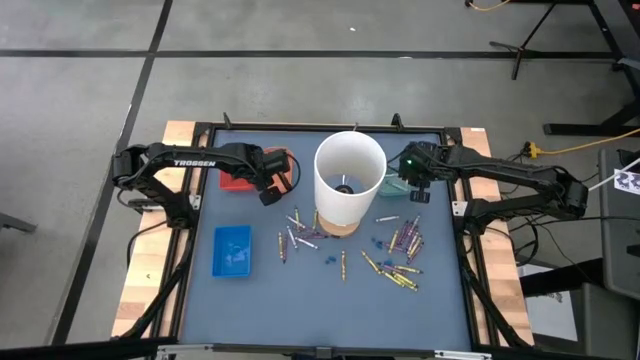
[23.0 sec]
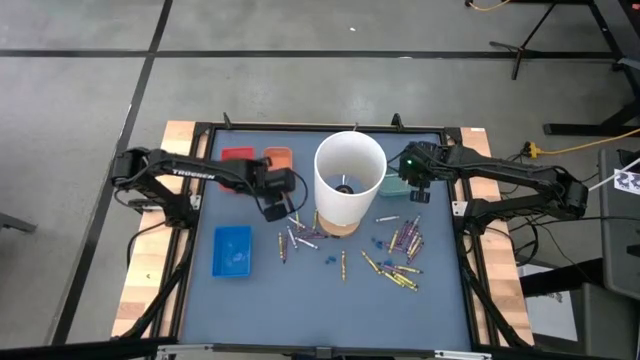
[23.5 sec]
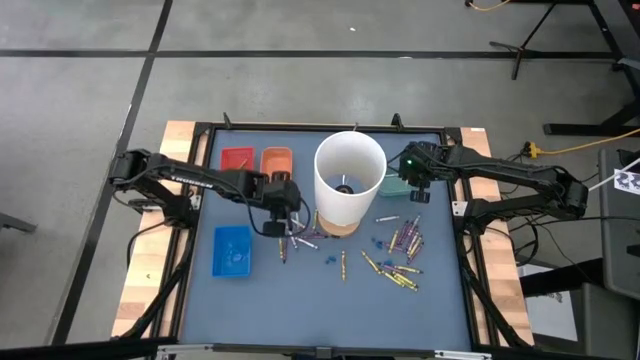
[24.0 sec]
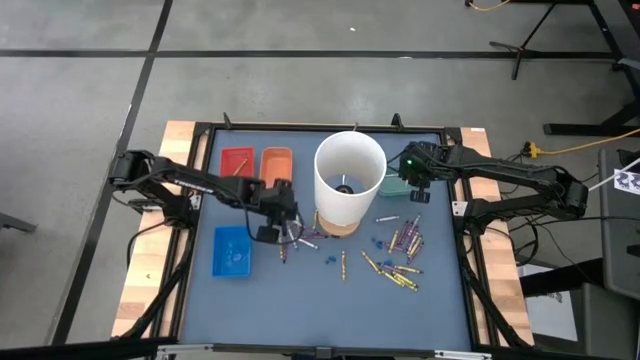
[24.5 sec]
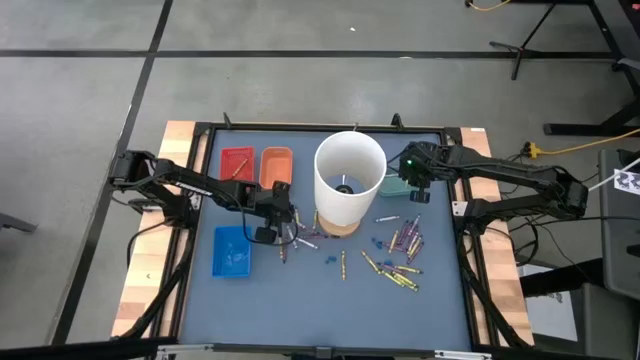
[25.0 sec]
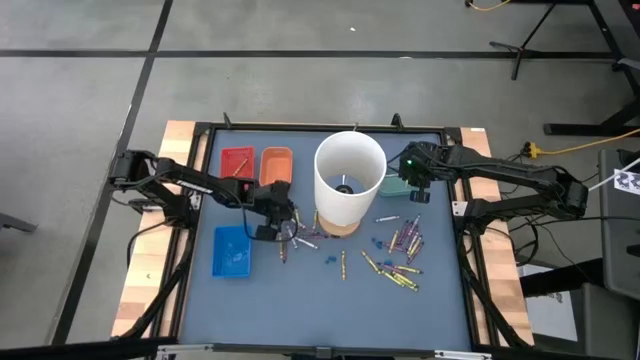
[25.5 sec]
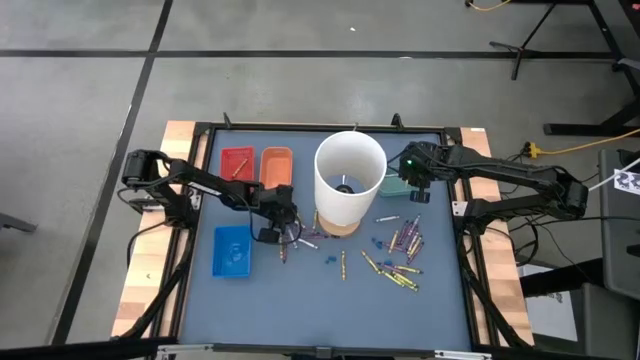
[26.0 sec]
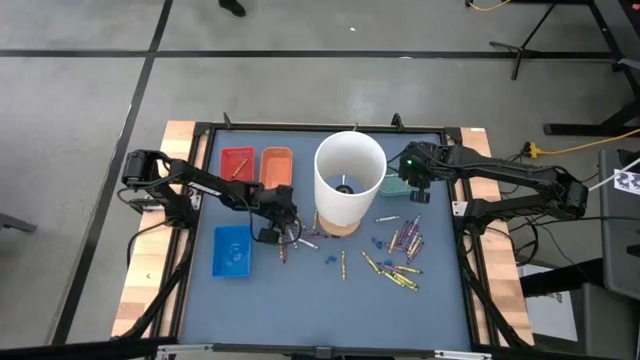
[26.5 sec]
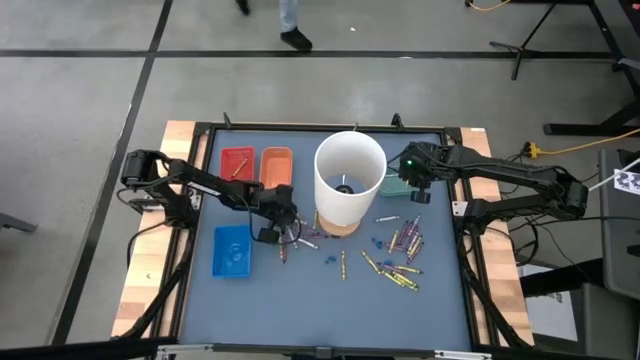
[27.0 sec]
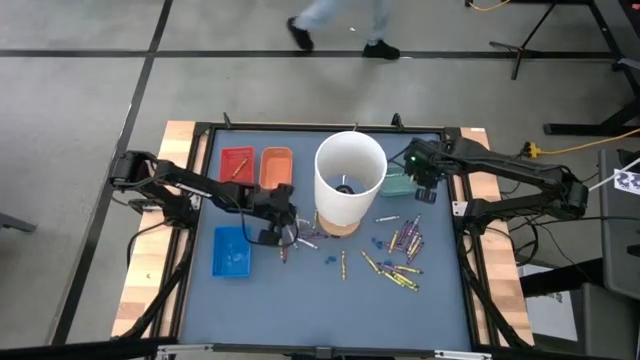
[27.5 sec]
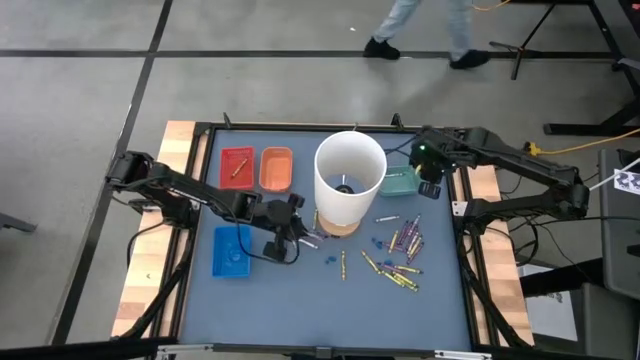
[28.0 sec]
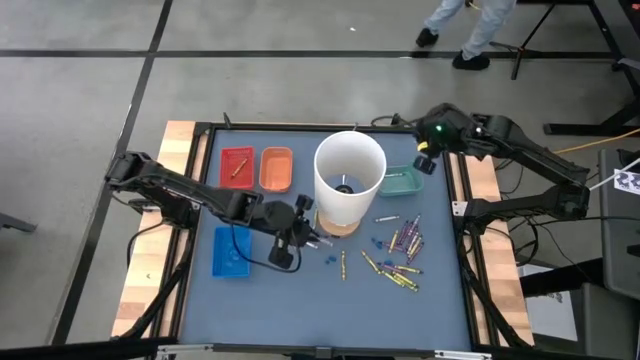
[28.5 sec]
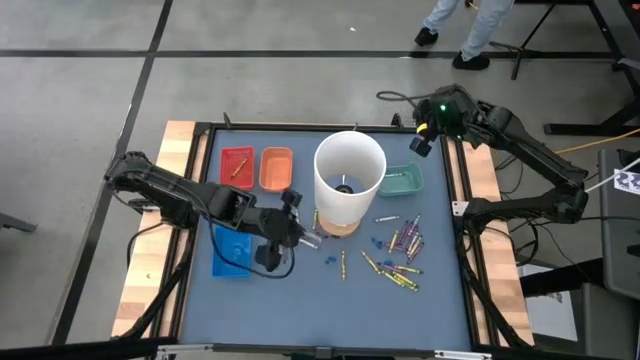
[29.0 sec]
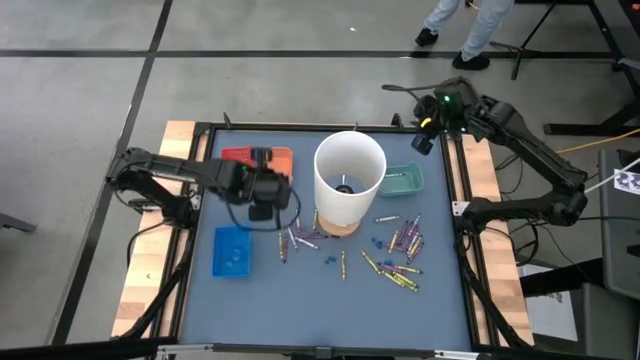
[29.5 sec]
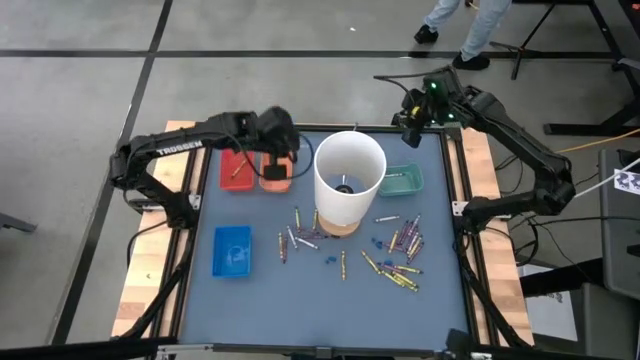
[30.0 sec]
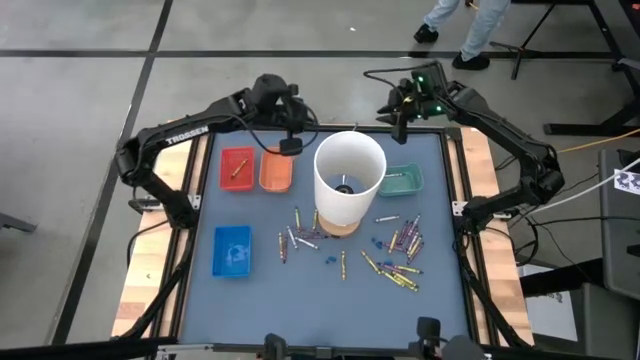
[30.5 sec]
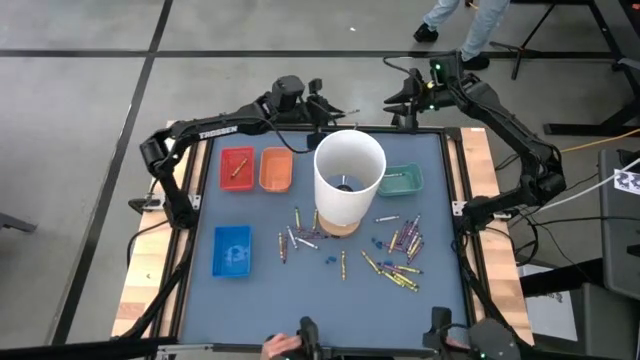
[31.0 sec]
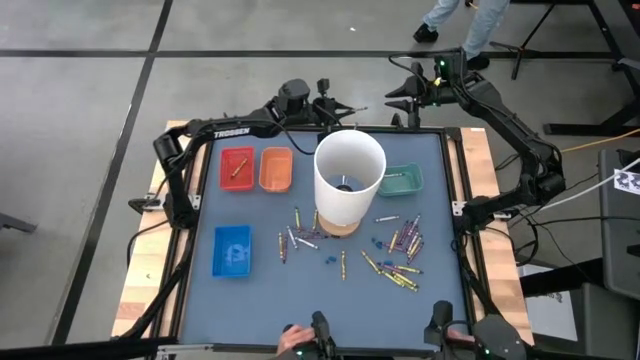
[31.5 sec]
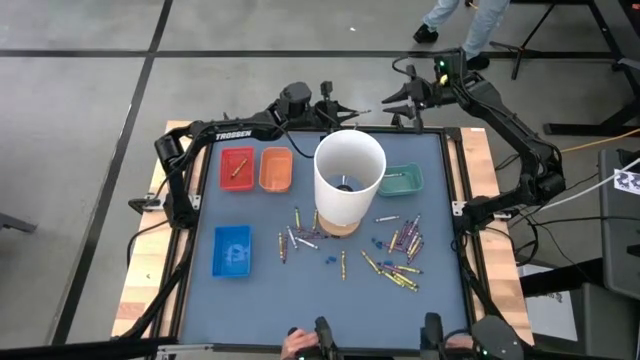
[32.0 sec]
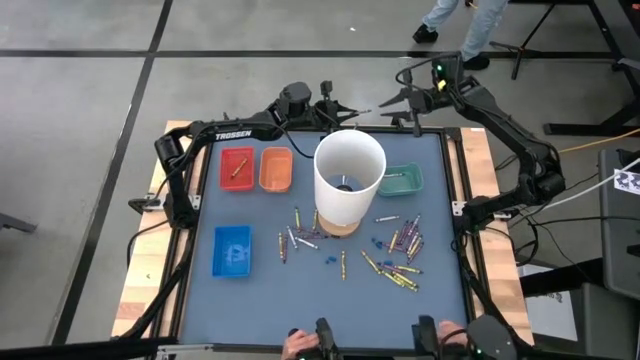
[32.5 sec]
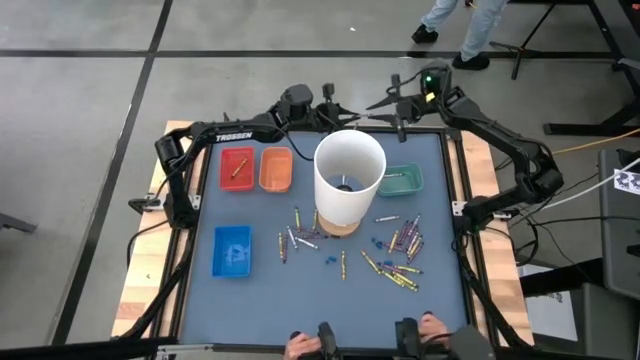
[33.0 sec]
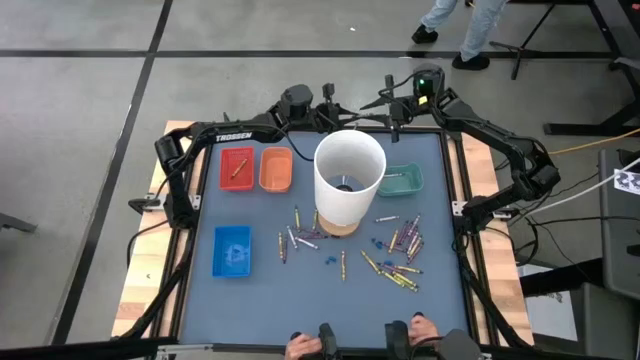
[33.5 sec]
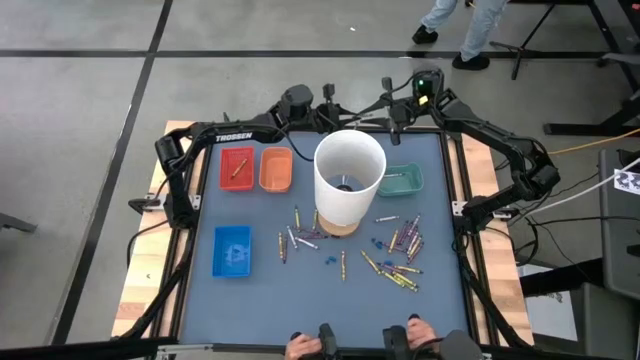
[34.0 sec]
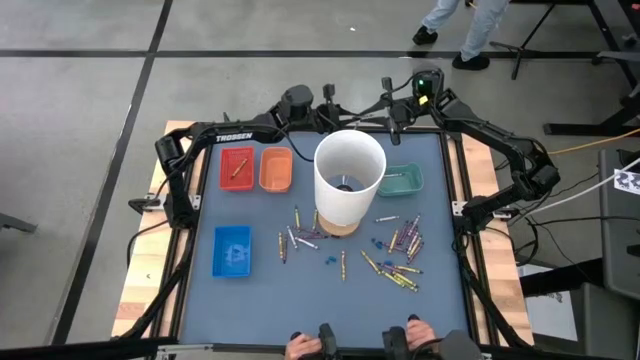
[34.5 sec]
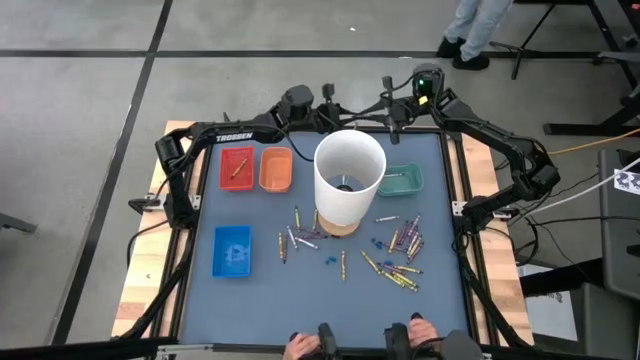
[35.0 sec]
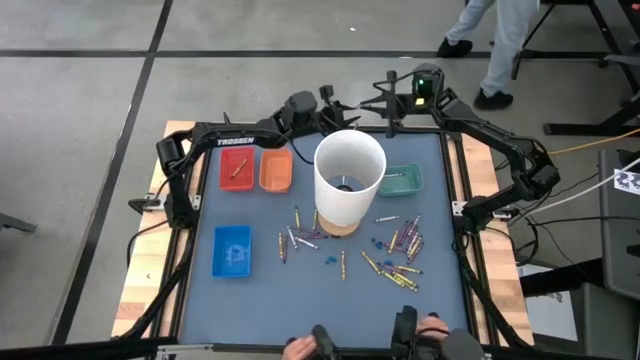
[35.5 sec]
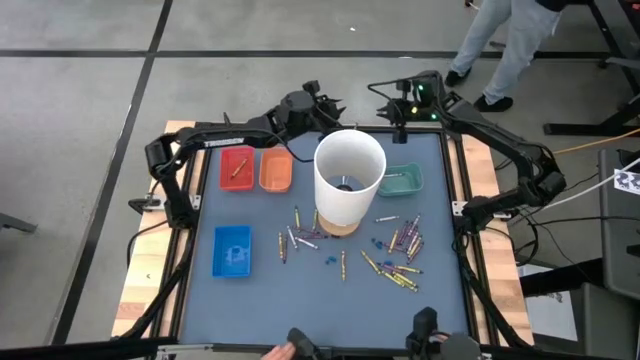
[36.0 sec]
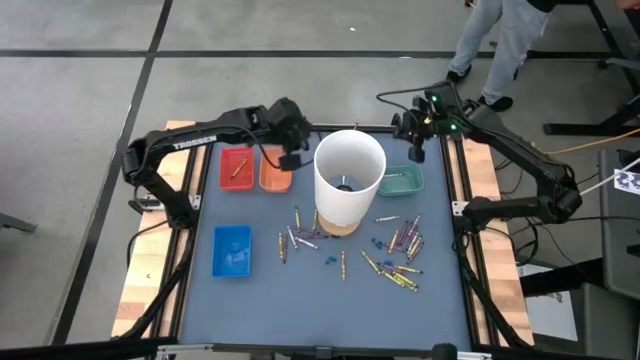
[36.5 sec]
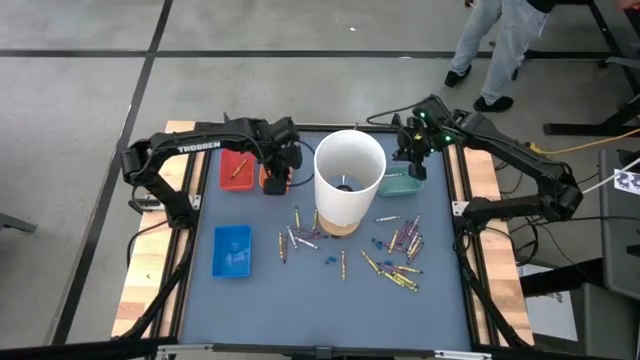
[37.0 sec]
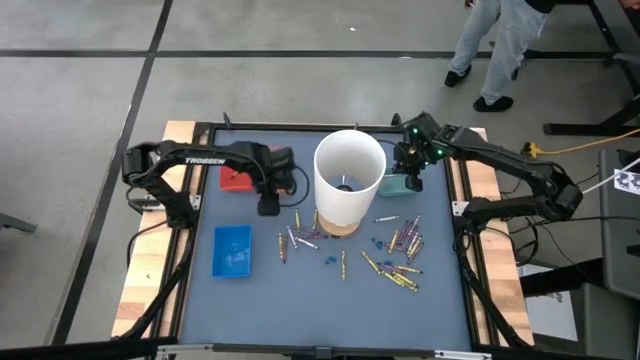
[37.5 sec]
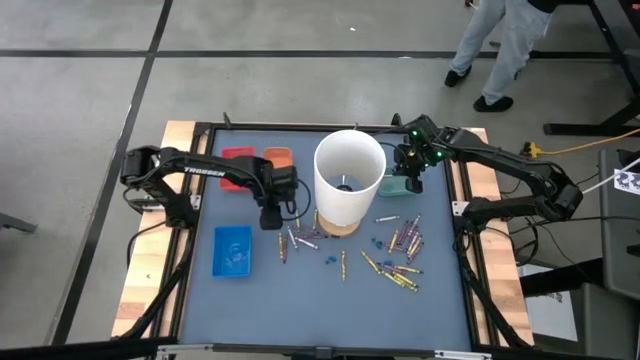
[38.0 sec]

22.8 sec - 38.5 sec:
Task: Sort crayons
Put the gray crayon into the green bin

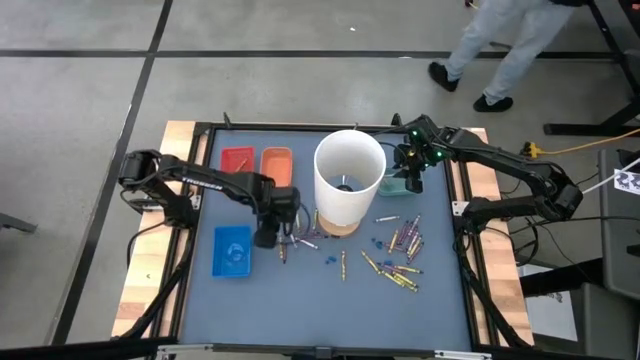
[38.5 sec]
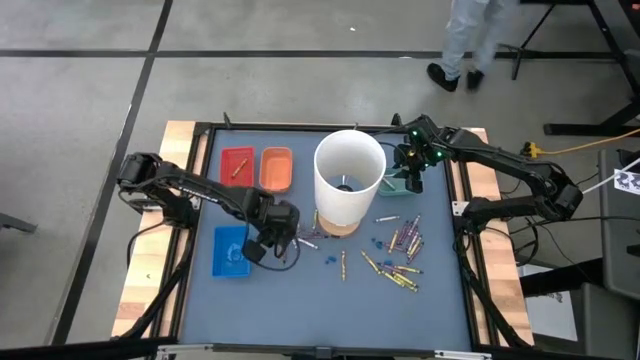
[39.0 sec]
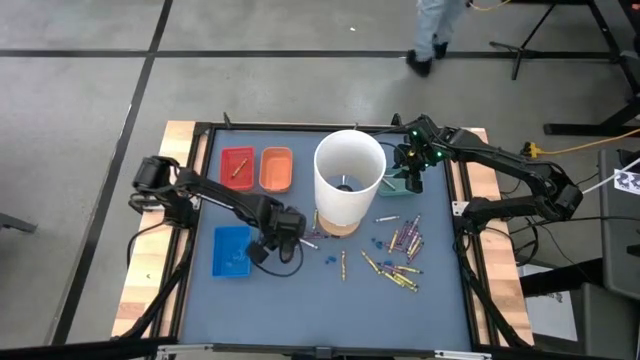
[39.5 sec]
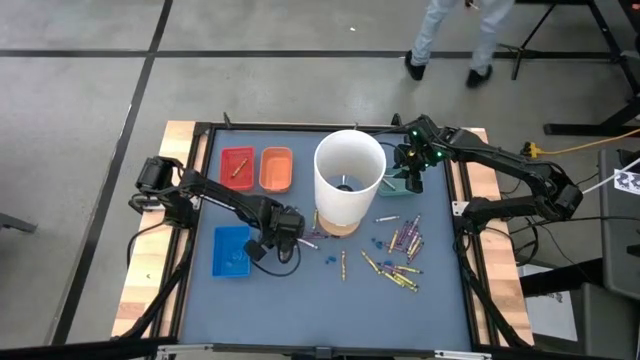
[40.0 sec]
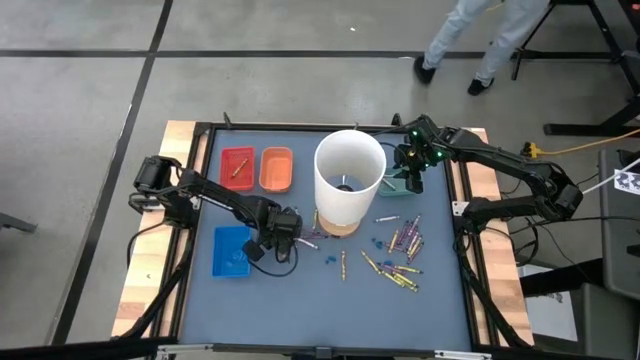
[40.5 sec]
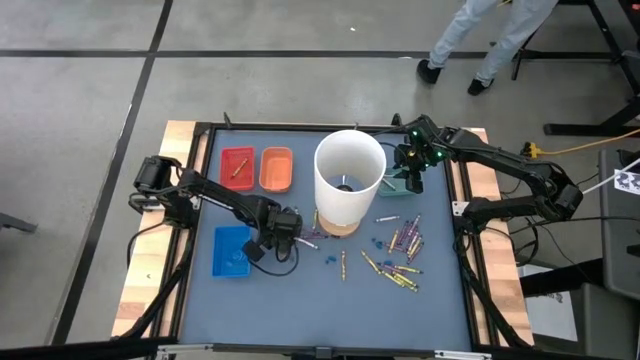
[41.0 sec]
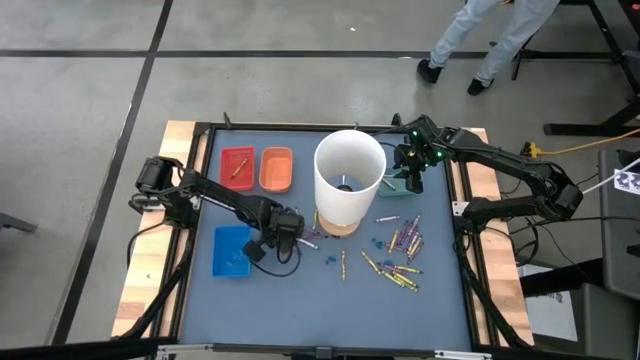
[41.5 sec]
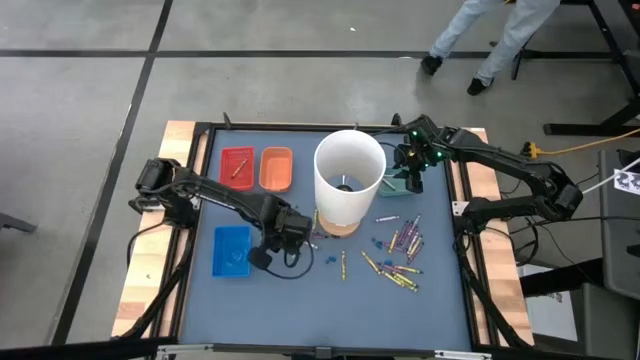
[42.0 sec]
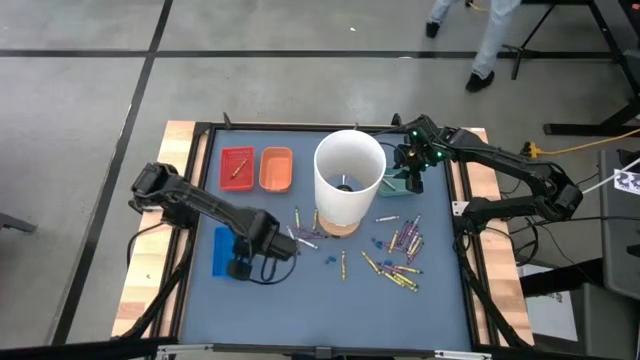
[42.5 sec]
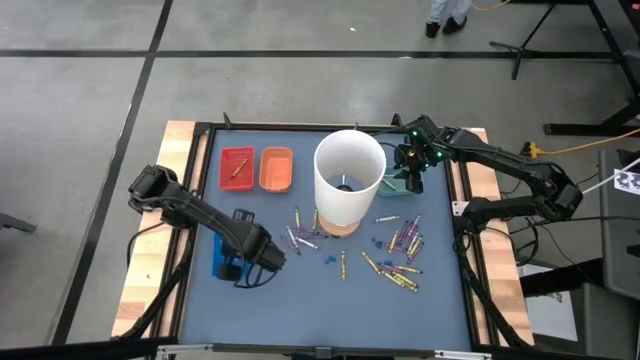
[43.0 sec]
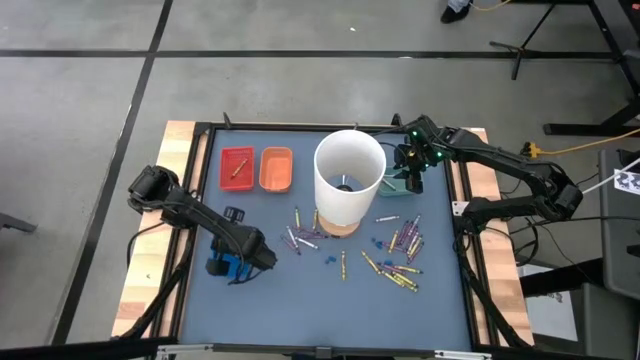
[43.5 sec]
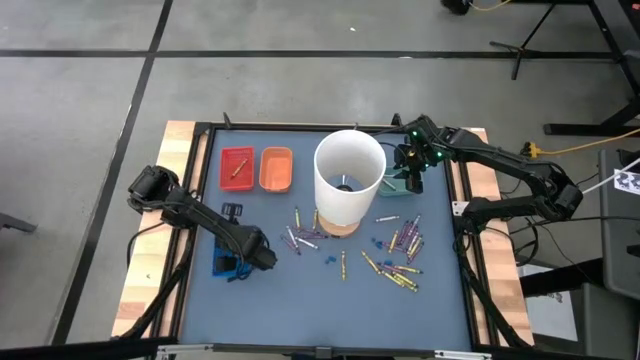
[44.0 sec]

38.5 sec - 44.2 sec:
Put the yellow crayon into the blue bin
